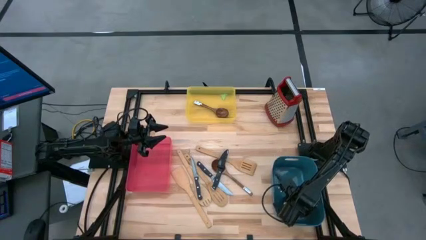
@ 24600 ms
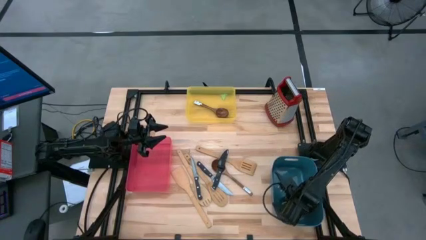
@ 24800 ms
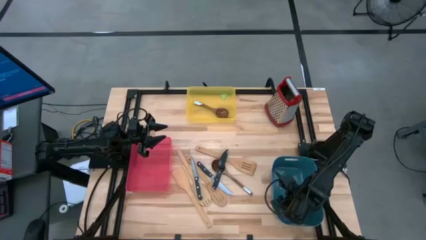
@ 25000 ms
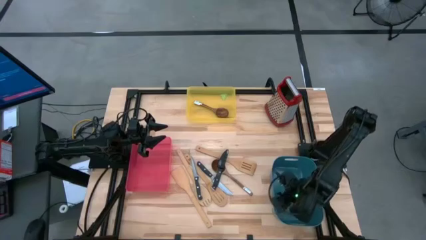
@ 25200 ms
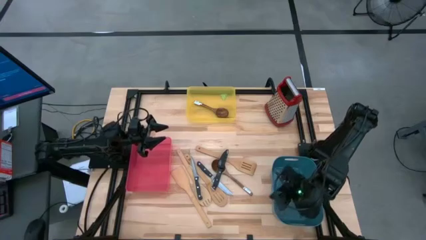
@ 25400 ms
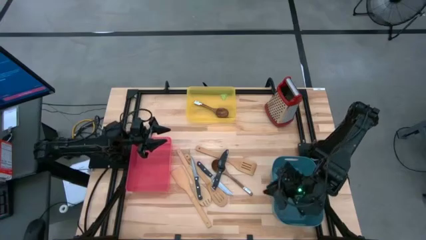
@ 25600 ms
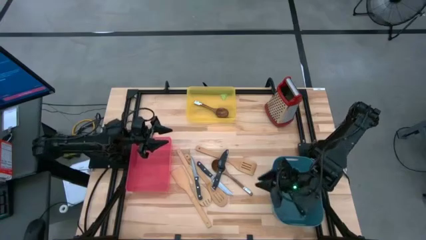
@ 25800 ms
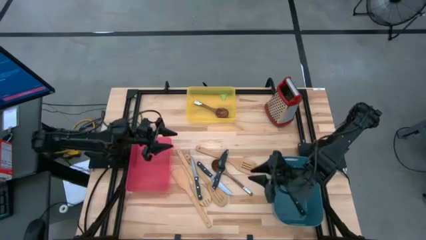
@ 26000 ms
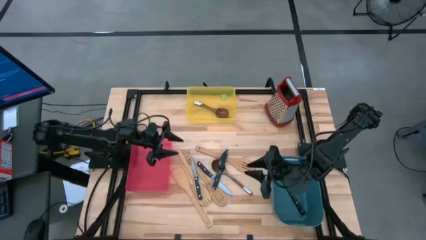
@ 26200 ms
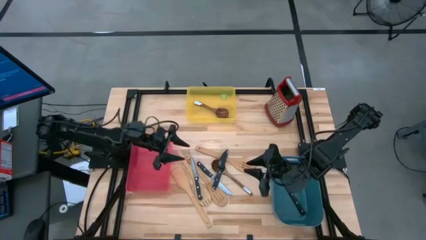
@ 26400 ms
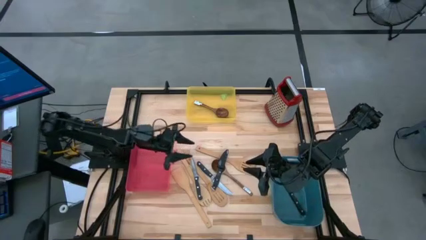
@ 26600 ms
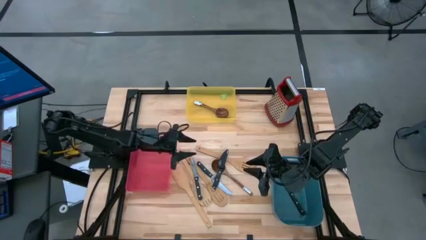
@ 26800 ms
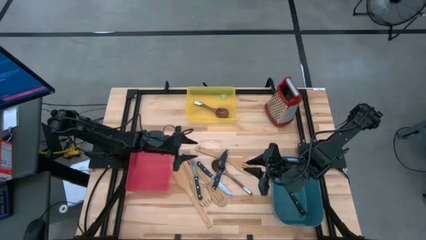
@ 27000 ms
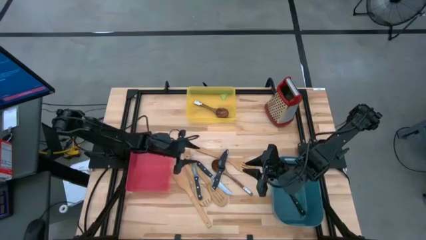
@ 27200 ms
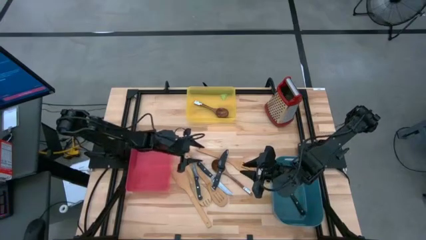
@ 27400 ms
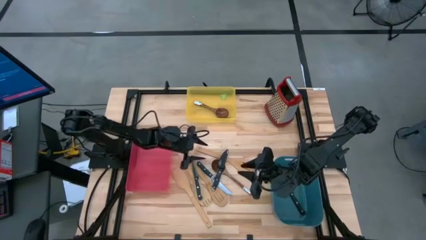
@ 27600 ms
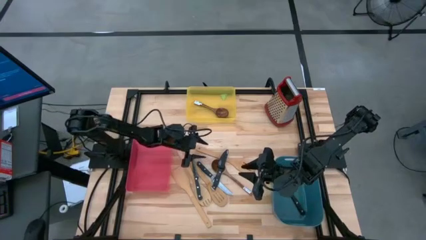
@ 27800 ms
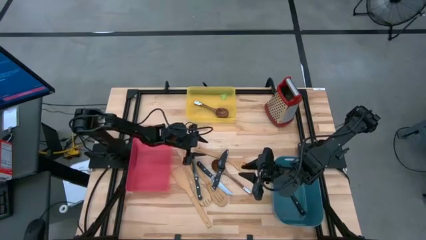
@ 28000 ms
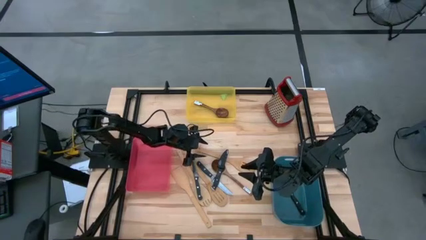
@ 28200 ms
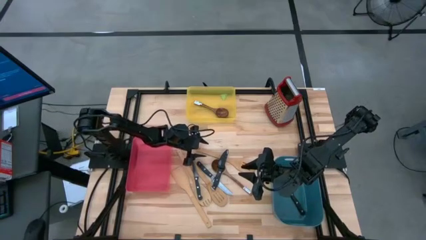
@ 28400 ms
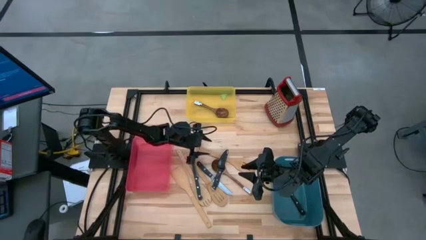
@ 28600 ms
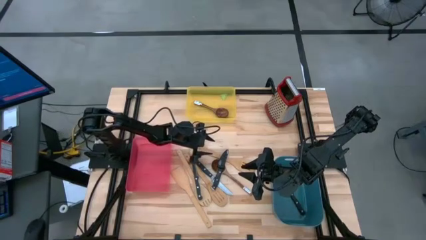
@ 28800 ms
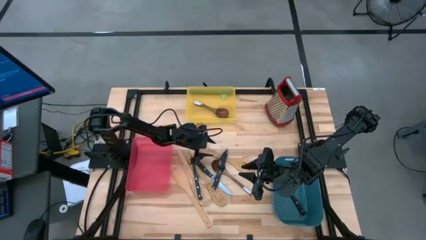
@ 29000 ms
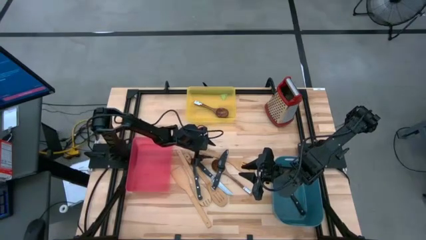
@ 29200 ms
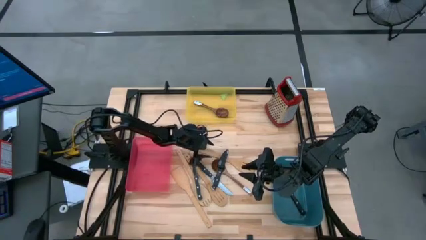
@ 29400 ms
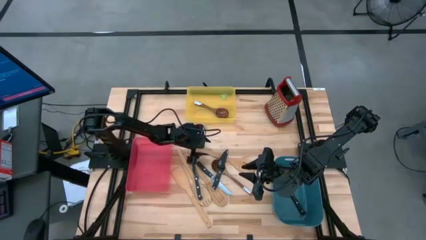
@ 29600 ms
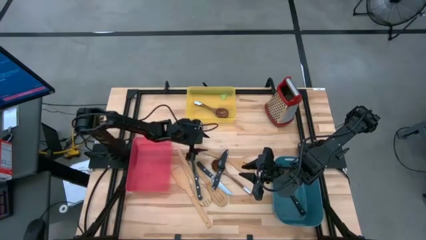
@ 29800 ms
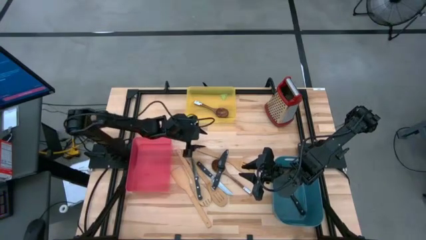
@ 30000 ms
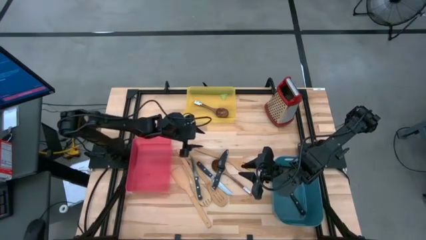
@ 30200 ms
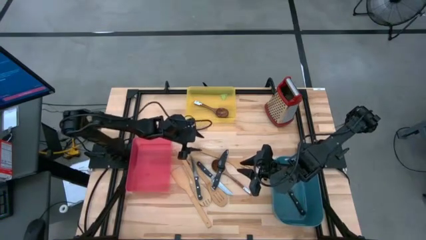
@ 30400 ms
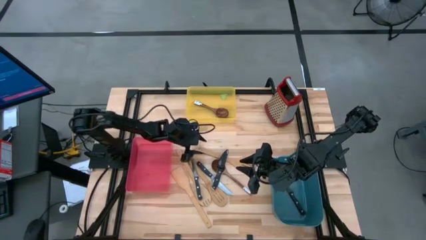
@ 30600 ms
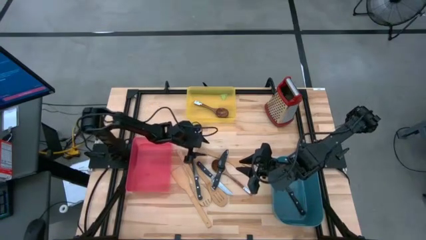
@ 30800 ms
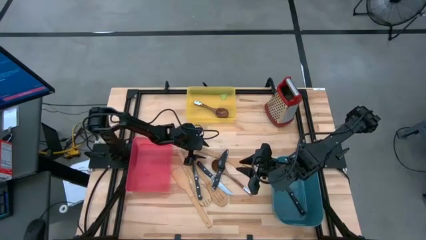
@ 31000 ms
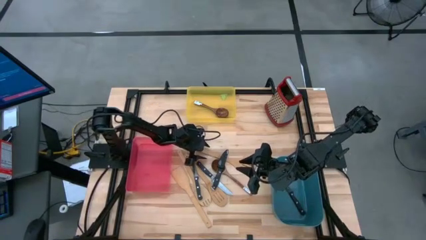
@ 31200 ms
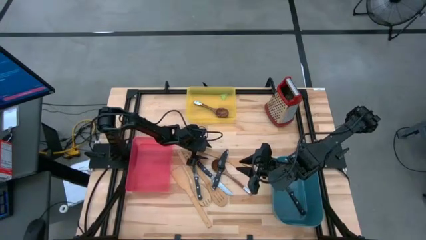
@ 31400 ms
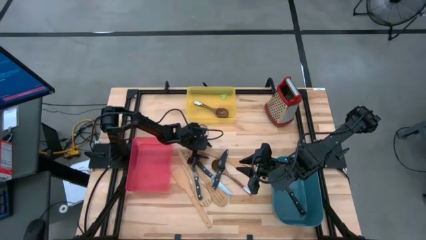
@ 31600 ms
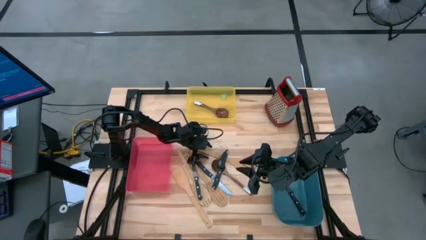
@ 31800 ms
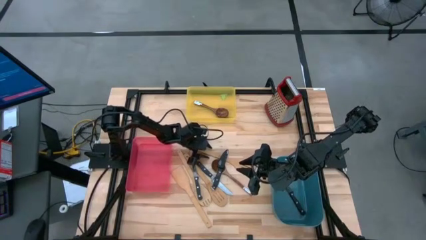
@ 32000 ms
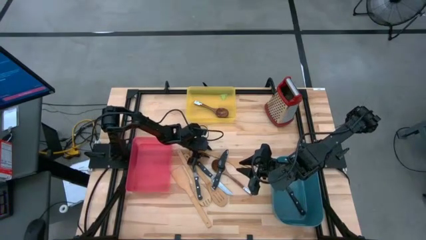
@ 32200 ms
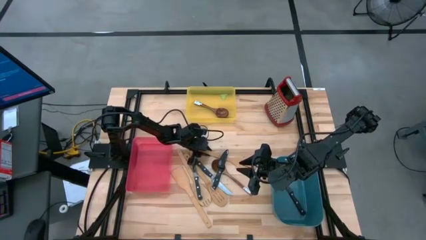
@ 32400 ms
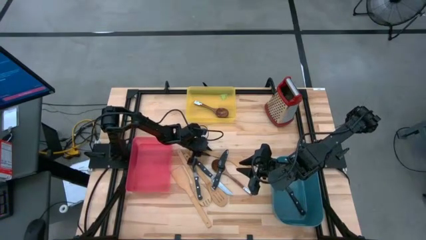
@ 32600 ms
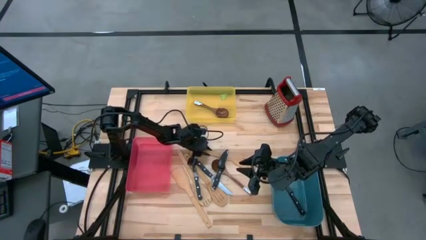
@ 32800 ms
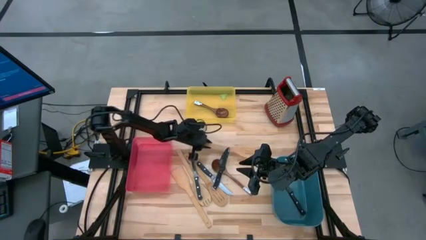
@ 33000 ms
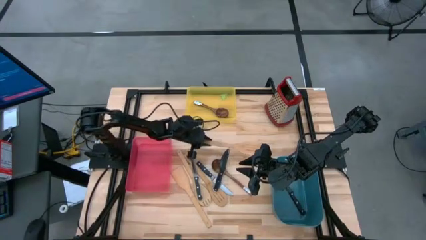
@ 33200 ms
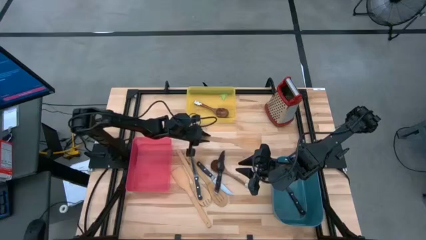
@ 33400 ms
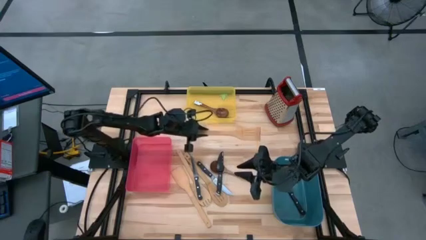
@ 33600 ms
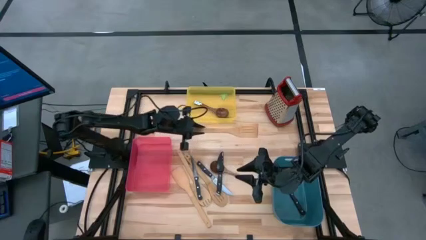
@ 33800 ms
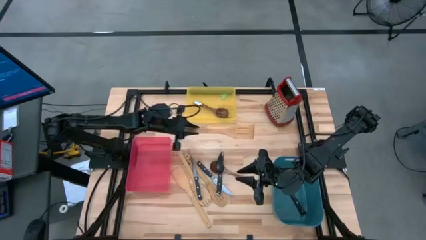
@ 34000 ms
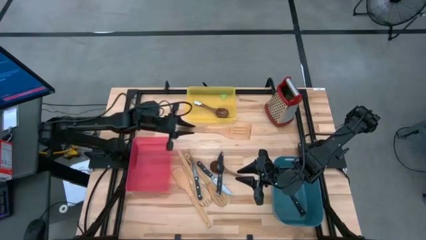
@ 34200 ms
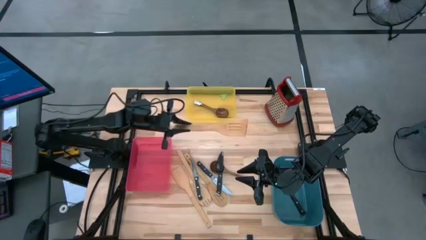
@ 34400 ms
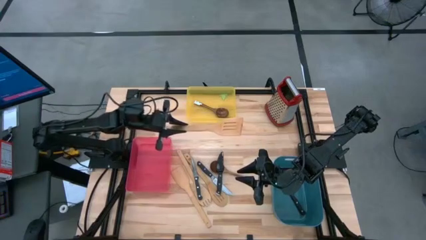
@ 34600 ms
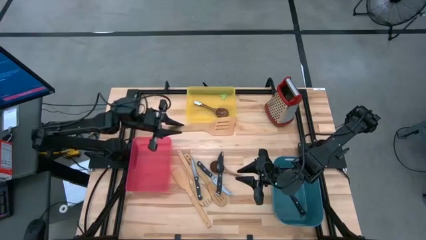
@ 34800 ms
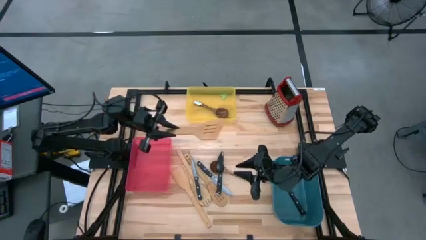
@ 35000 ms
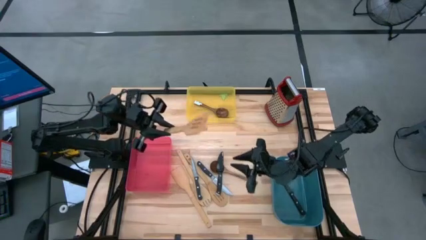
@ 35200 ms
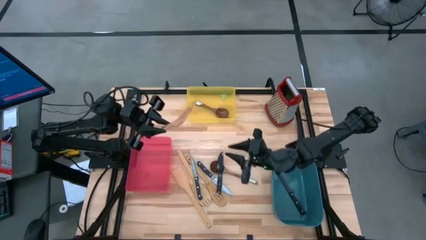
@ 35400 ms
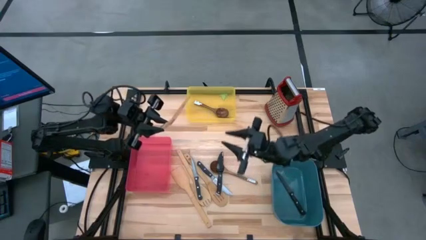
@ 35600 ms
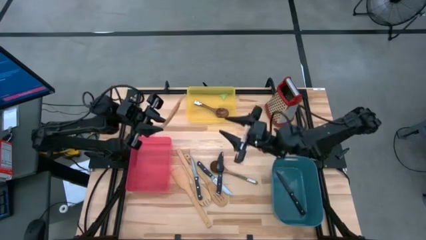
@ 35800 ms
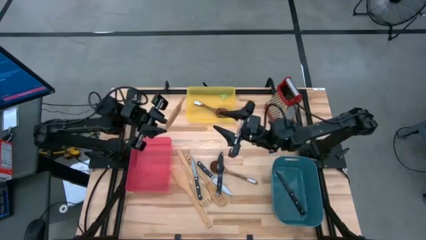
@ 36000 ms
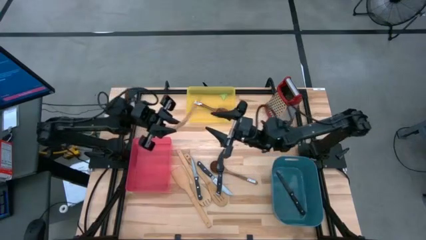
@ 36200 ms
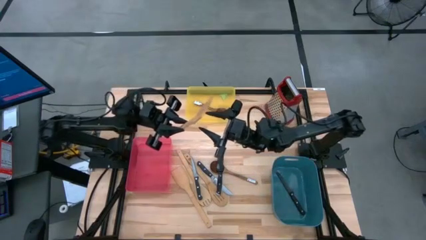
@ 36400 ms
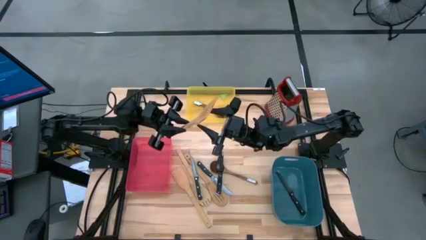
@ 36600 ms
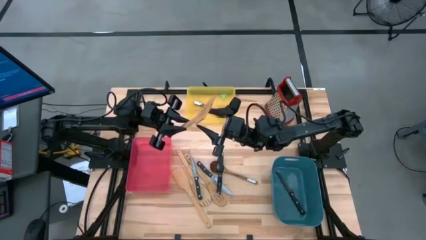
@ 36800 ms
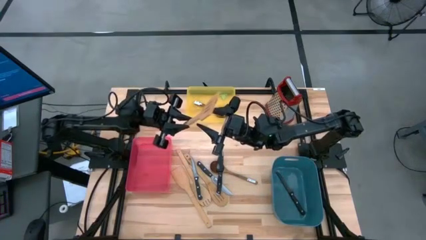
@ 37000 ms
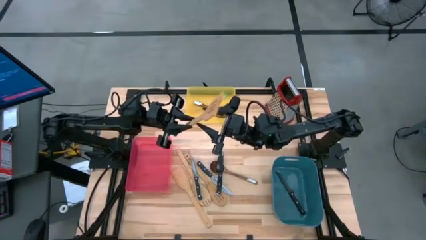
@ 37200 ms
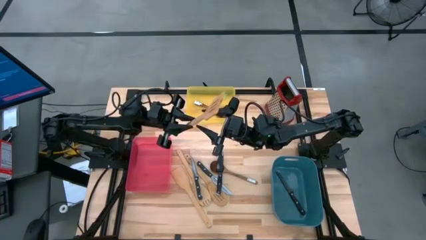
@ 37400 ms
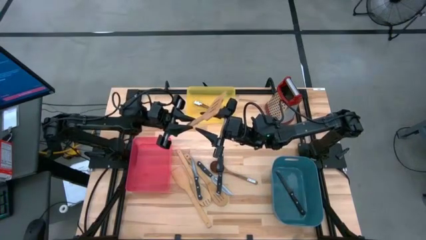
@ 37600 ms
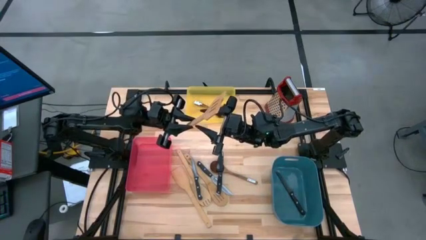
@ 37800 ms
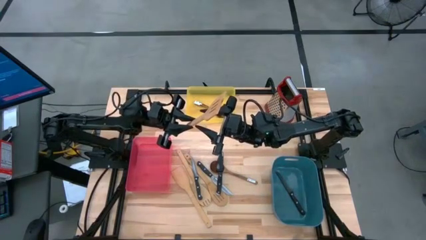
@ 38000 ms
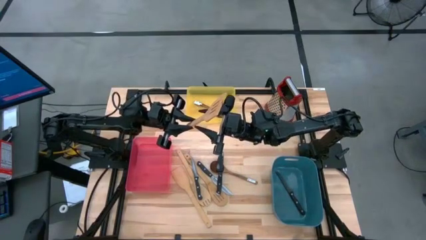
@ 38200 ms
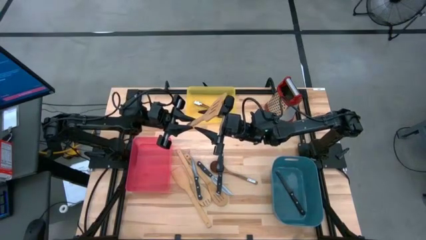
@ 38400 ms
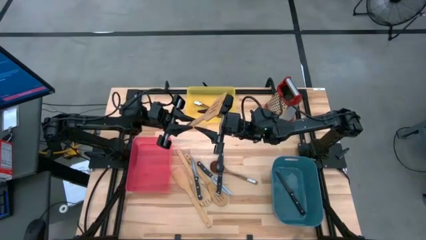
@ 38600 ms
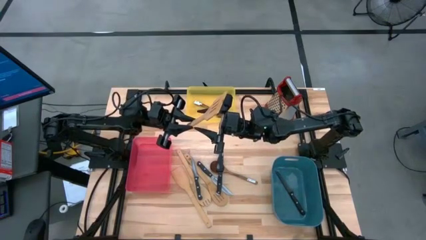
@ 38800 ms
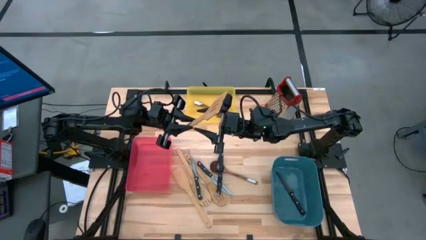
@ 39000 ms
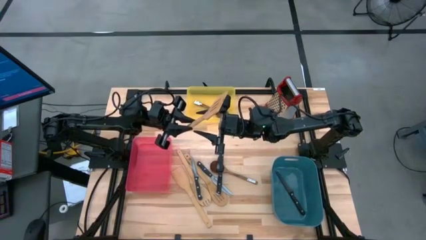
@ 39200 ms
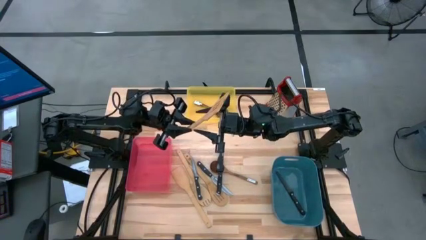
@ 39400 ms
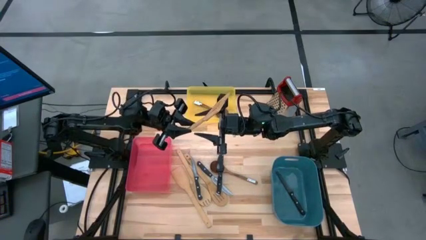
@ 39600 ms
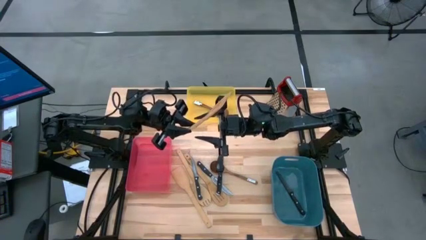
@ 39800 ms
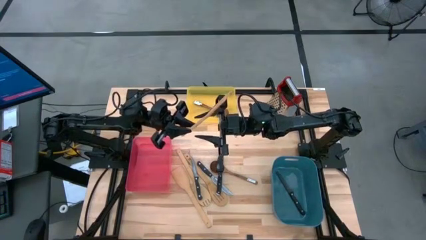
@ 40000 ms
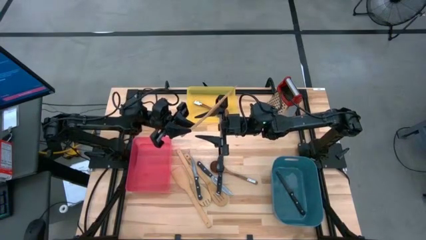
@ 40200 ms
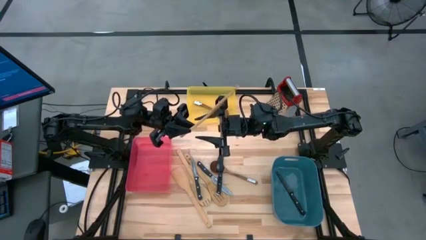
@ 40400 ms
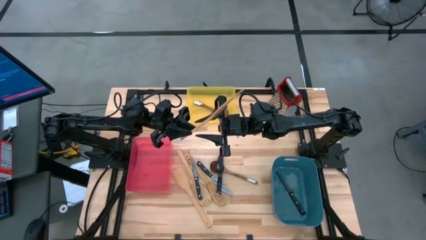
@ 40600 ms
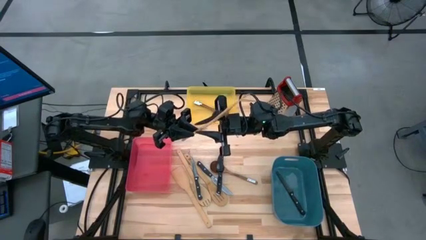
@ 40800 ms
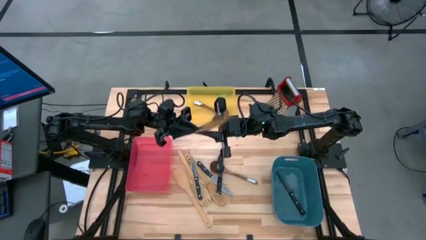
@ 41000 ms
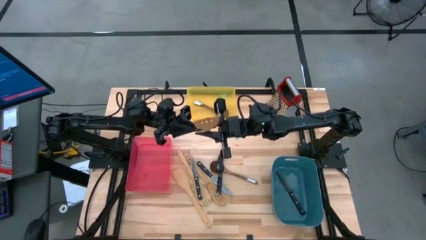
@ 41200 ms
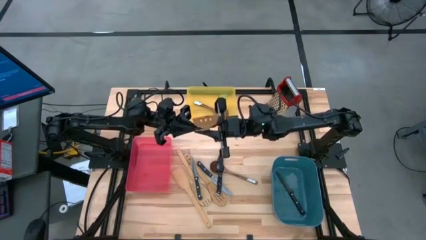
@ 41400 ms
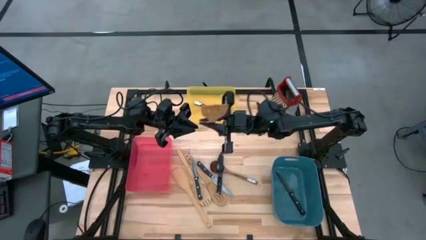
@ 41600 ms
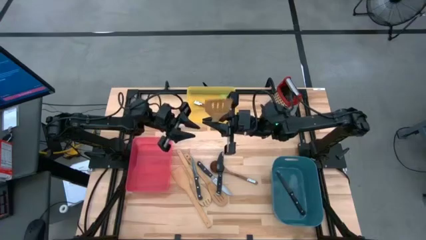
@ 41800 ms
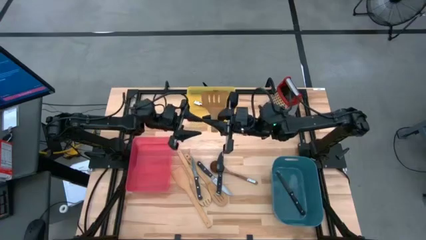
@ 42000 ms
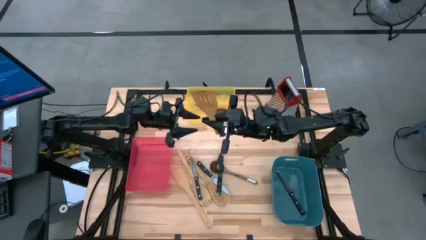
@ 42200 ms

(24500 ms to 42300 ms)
Task: Pick & Place Kitchen Items
Put the brown spatula into the red bin
